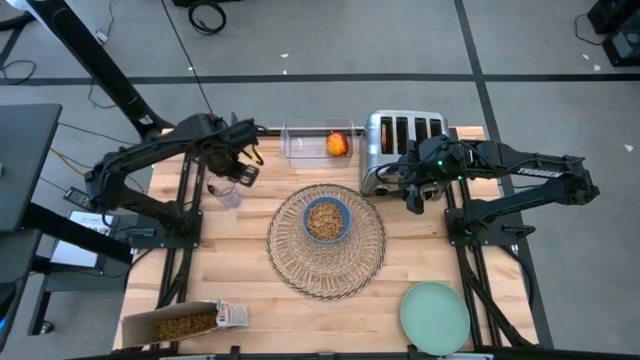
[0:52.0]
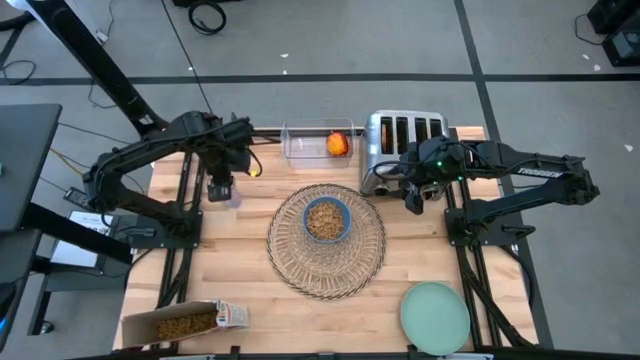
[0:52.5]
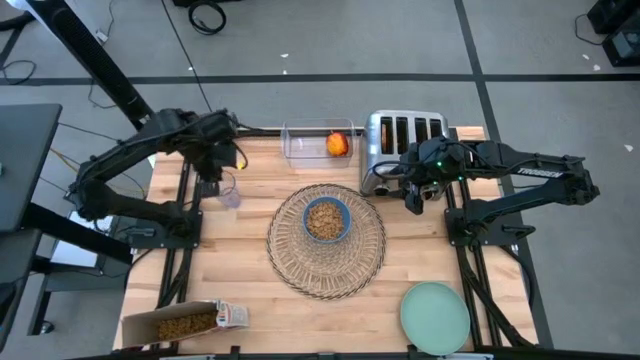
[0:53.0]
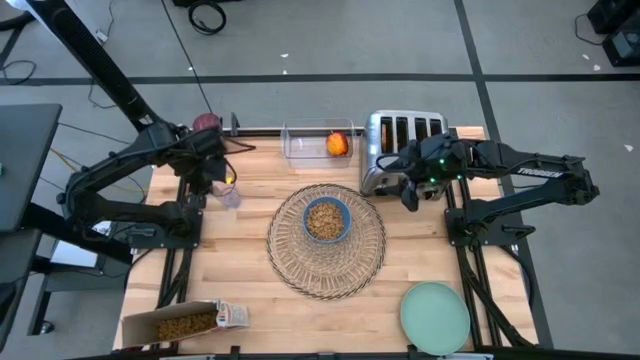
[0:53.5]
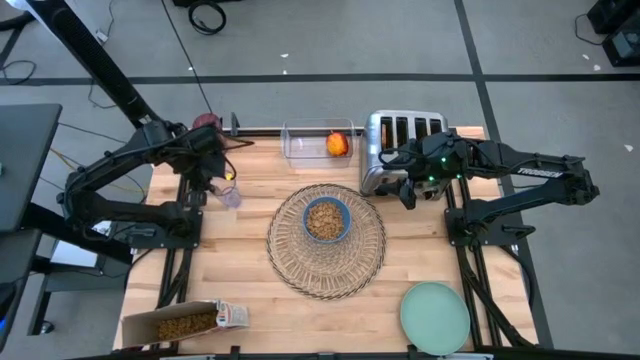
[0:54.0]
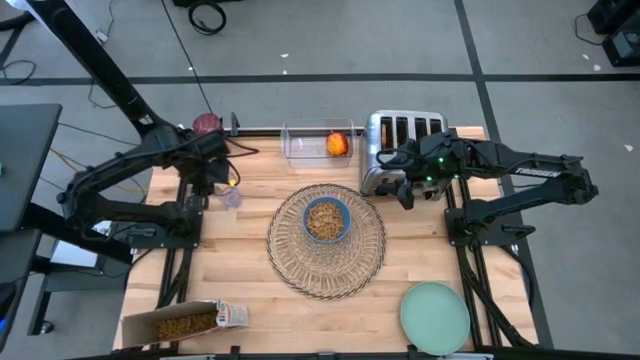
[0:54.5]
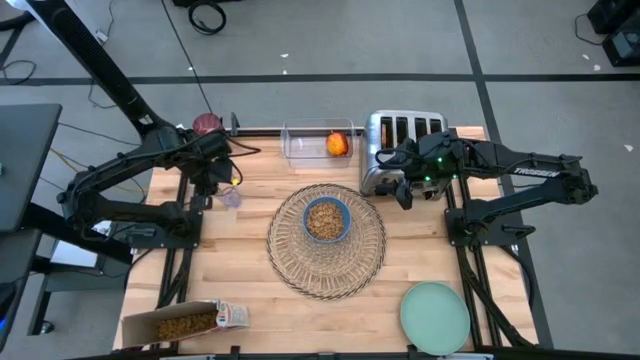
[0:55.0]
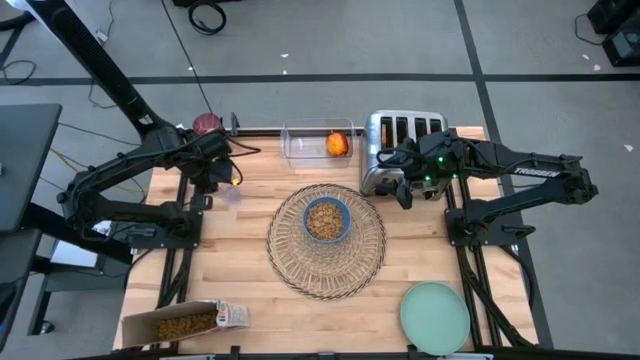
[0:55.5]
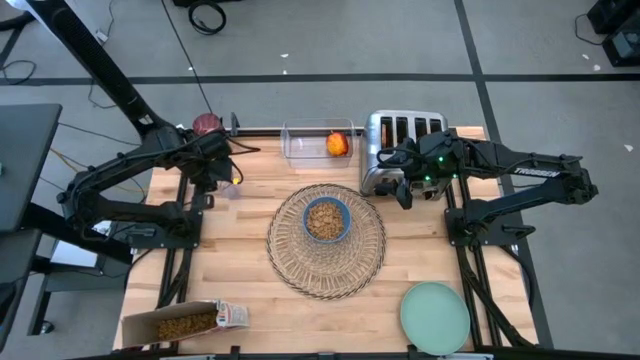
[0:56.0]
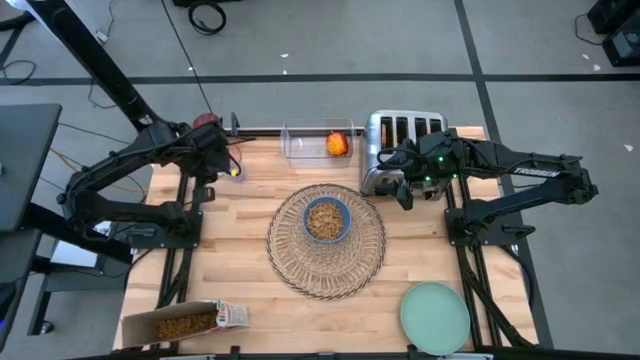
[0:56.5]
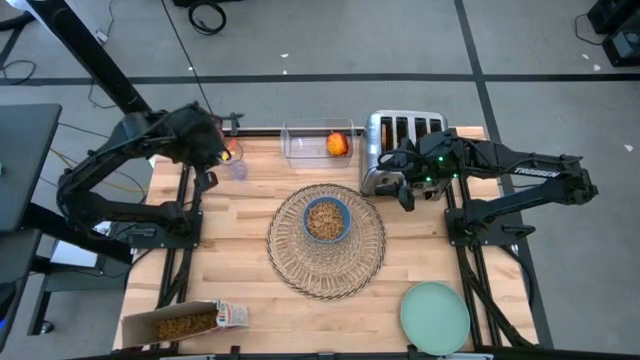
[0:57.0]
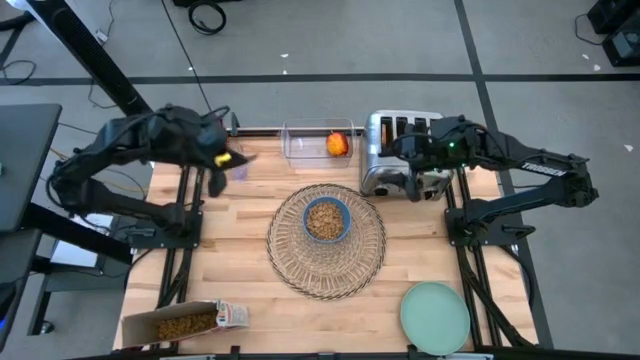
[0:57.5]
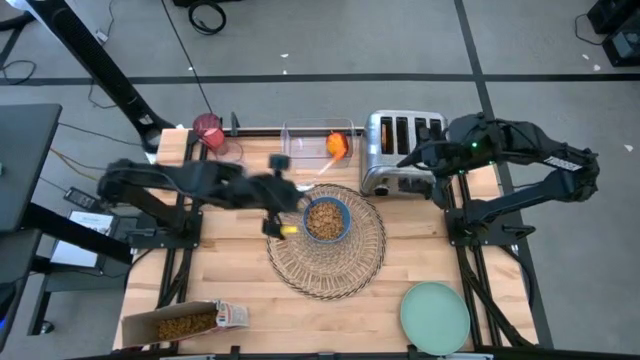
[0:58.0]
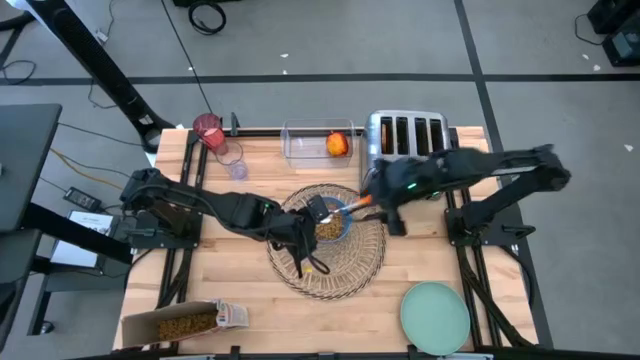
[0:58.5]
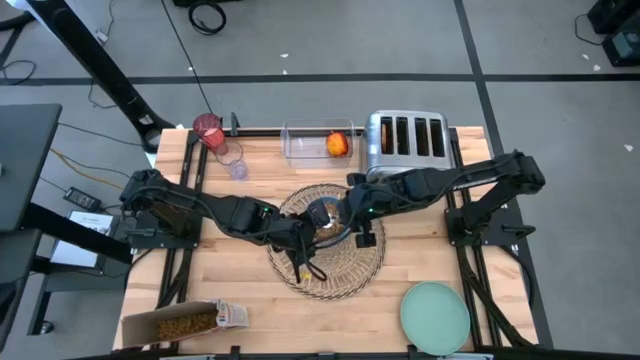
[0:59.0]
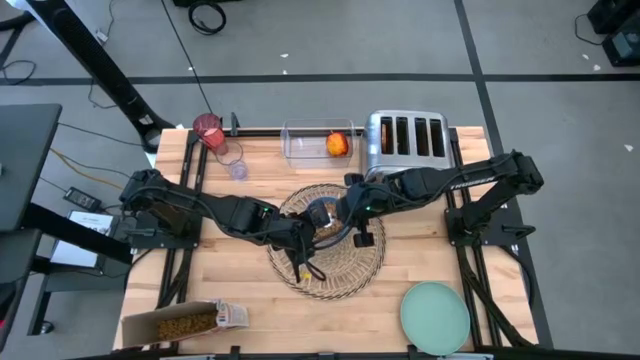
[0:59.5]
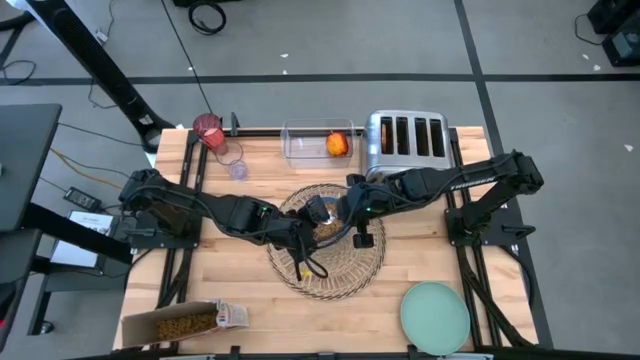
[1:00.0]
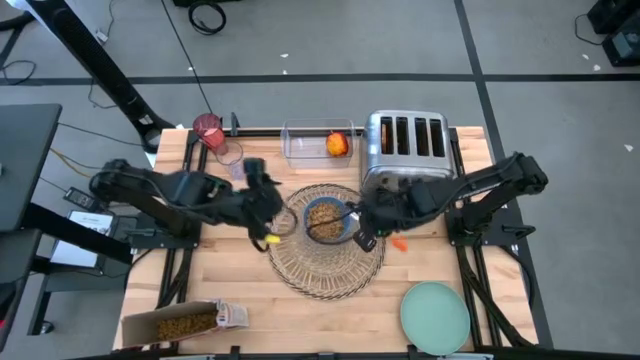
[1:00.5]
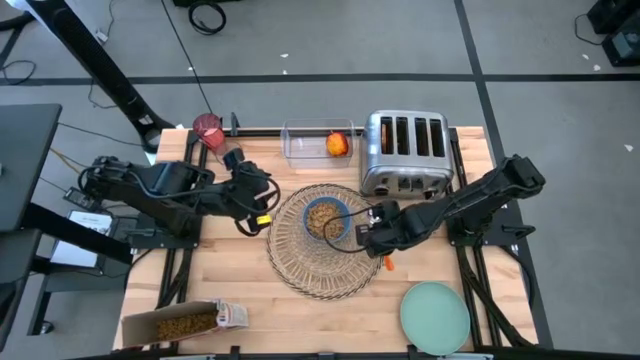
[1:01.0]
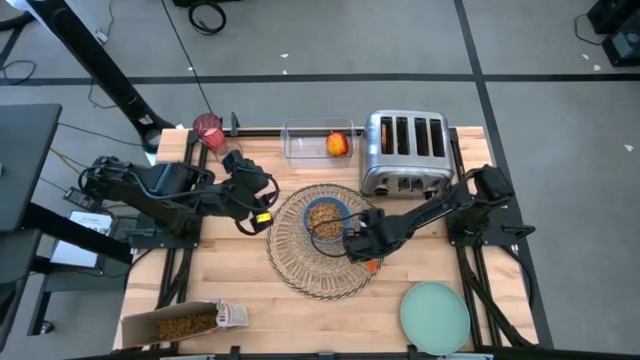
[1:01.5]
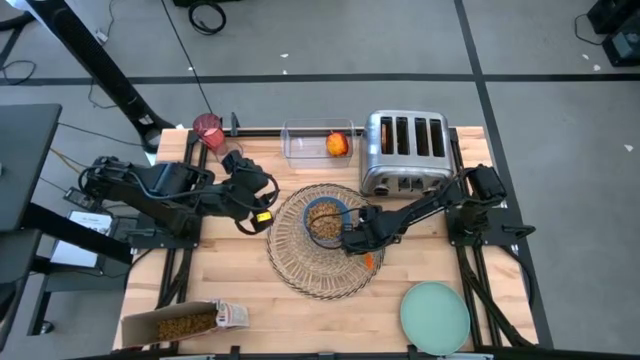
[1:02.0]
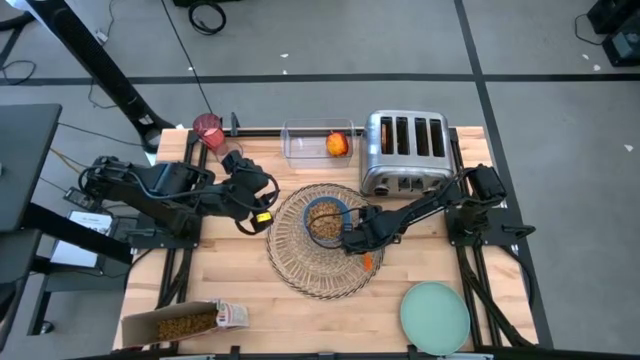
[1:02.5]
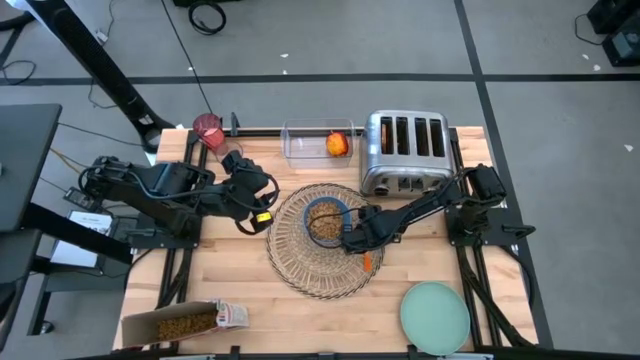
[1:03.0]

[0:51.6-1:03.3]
Task: Arrange a breakfast setting
Put the orange spoon to the right of the blue bowl on the brown placemat

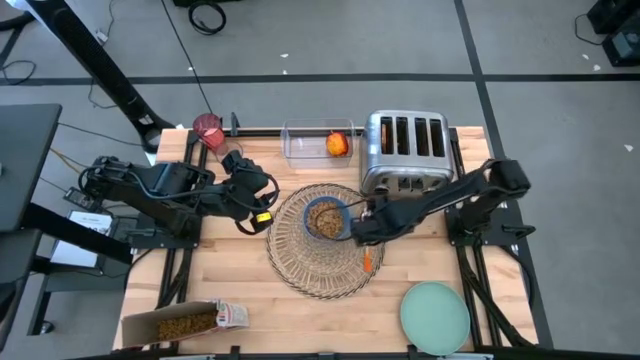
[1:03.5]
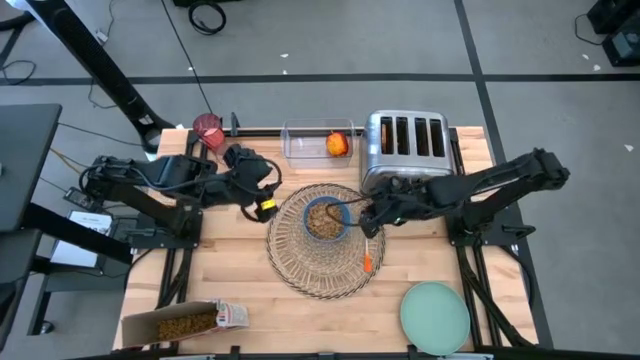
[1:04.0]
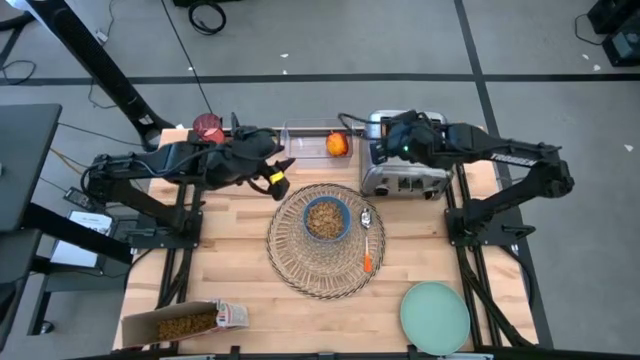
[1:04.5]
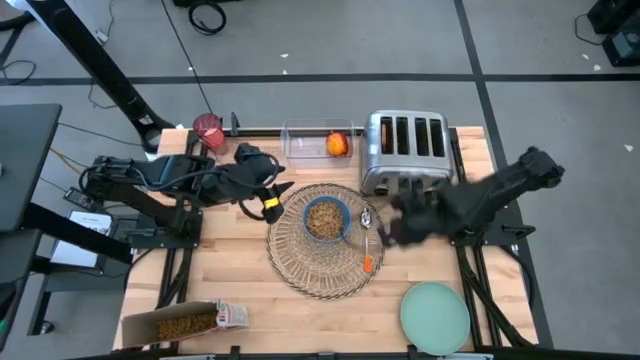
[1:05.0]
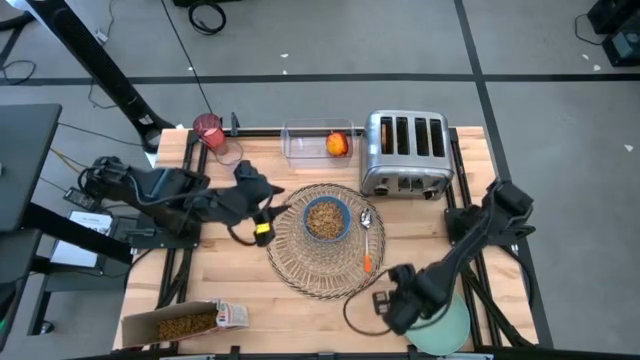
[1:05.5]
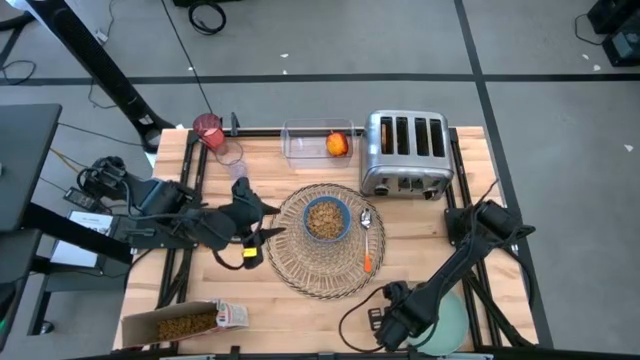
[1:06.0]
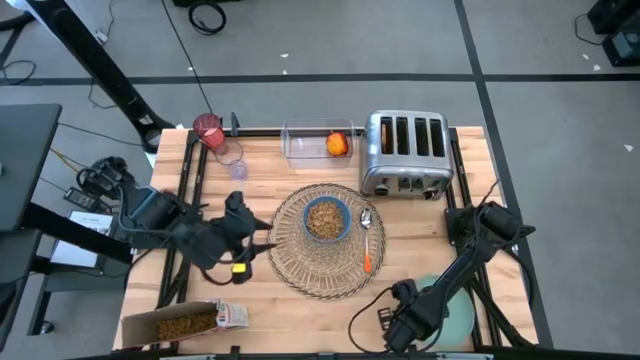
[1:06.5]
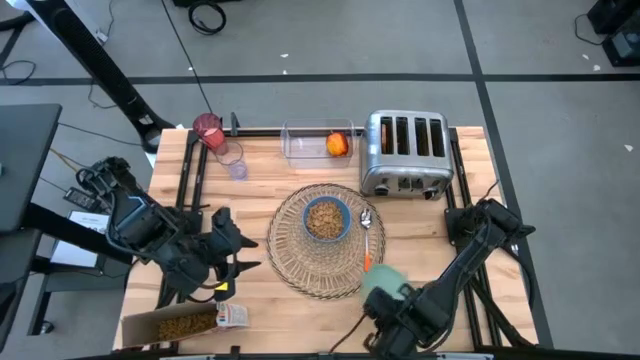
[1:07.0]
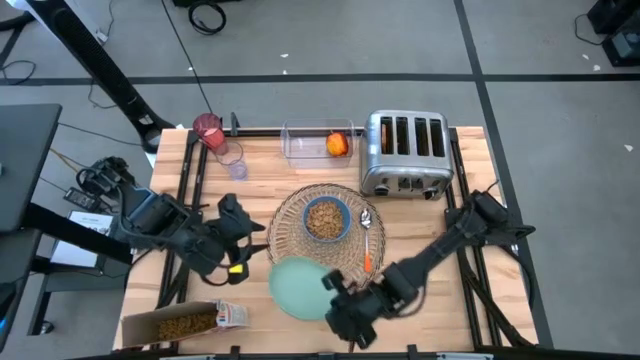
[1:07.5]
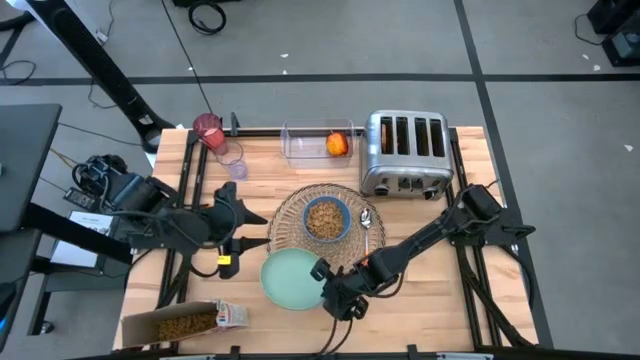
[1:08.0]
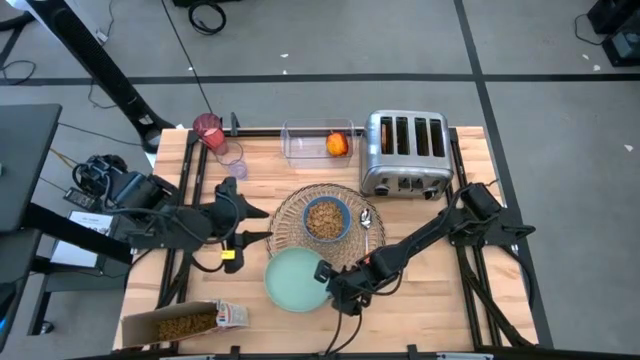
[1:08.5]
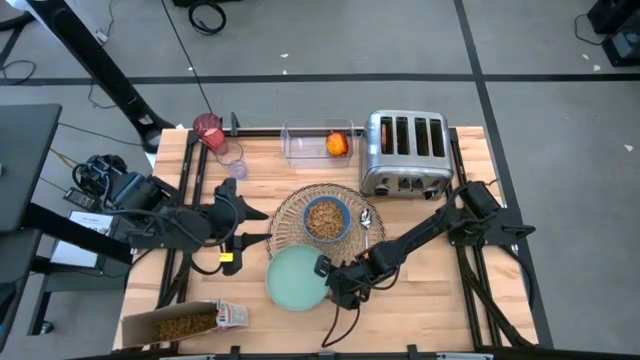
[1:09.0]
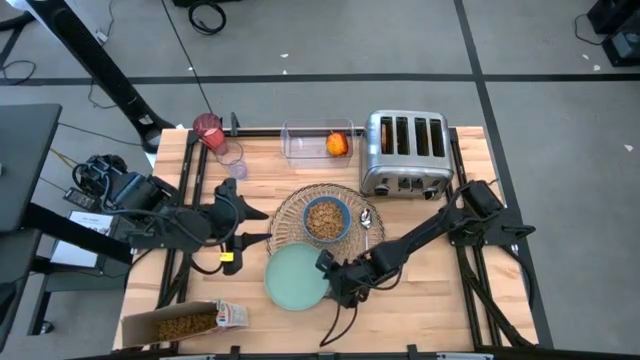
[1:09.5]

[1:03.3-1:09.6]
Put the light green plate to the bottom left of the blue bowl on the brown placemat

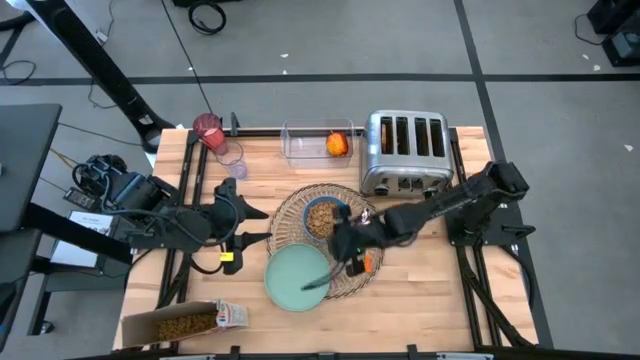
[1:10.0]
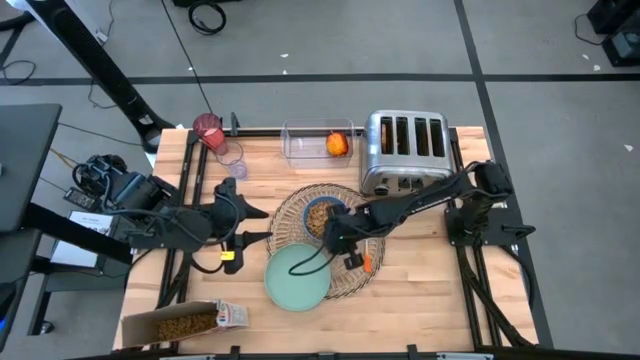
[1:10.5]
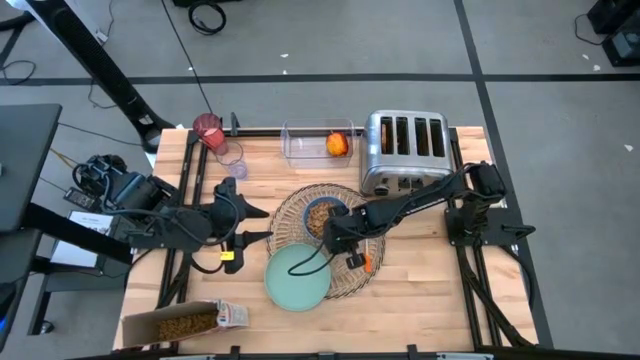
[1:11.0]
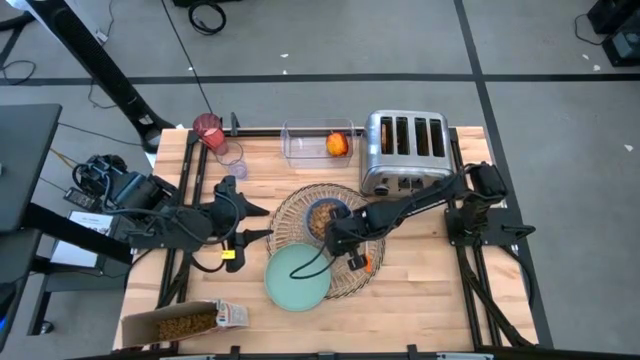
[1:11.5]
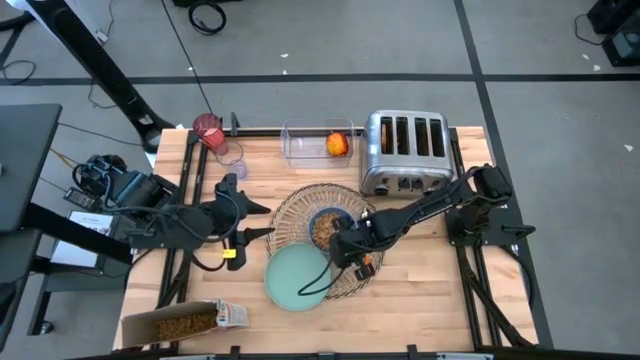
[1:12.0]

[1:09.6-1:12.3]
Adjust the blue bowl on the brown placemat

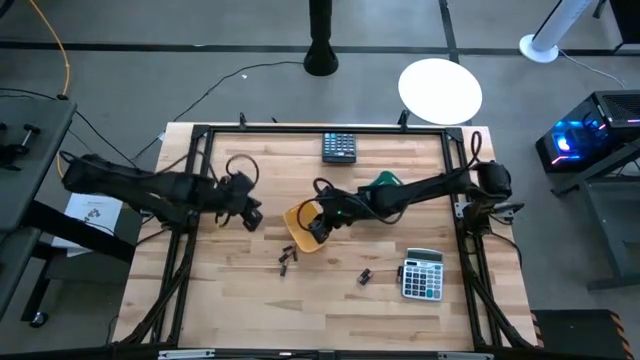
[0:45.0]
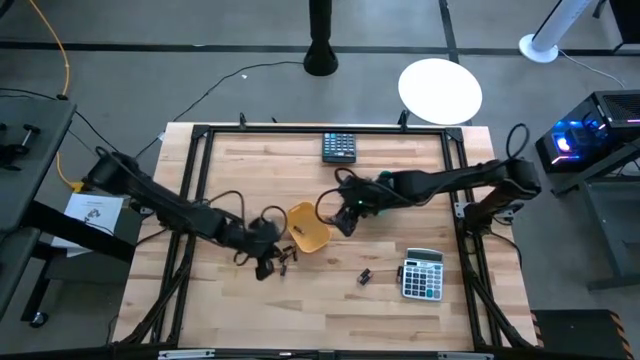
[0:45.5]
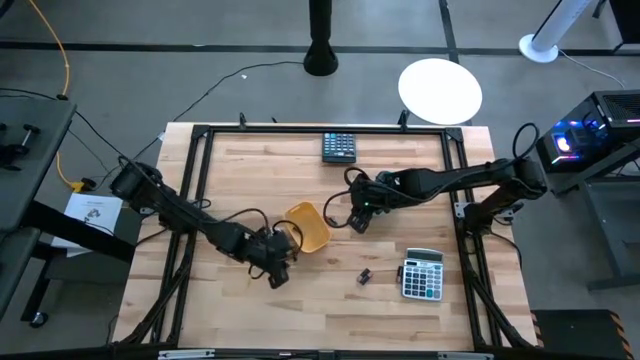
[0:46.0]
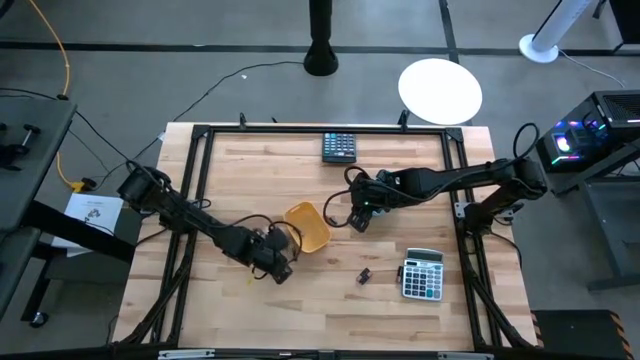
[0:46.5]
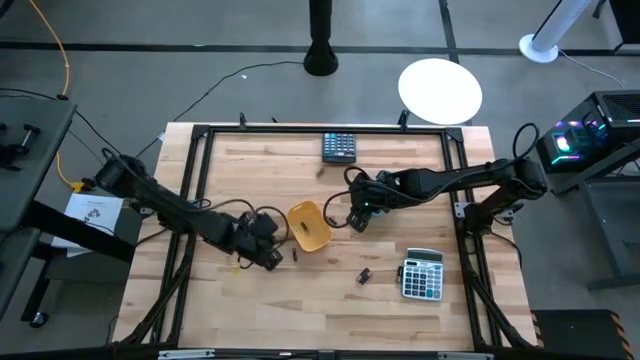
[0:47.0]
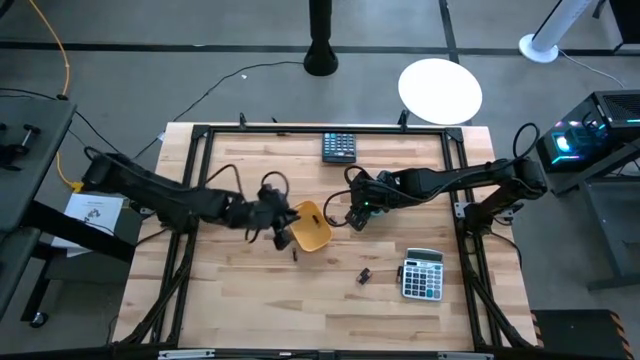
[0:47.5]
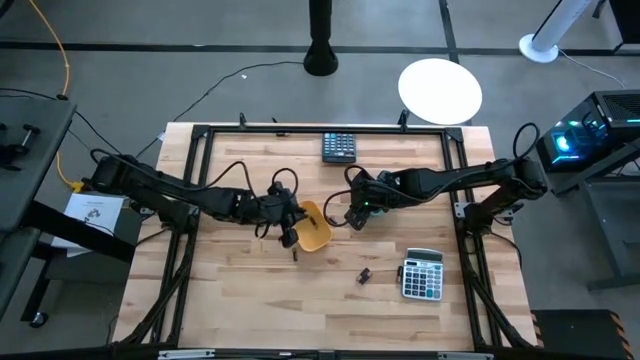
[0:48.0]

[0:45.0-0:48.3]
Task: Sort batteries
Put the black battery into the yellow bin
